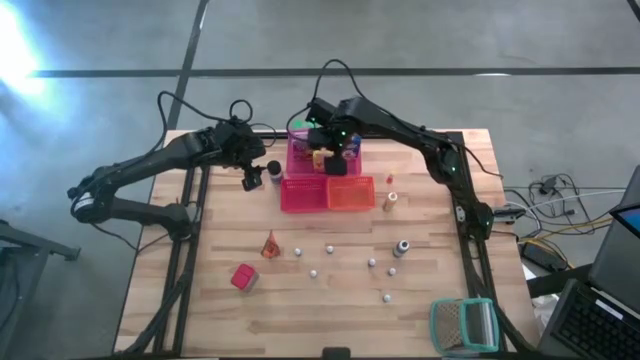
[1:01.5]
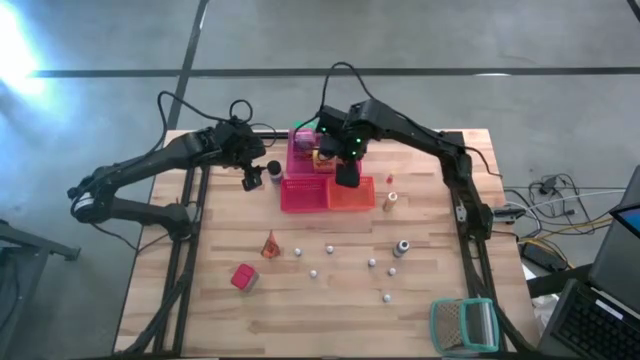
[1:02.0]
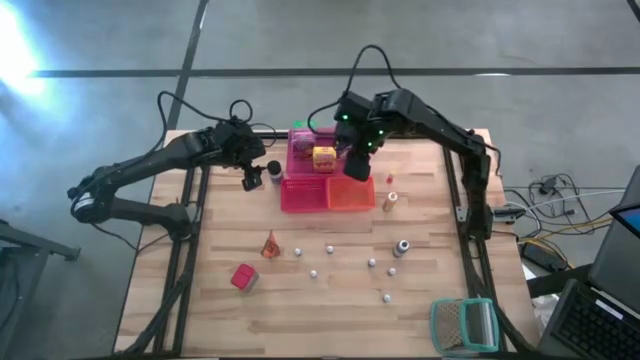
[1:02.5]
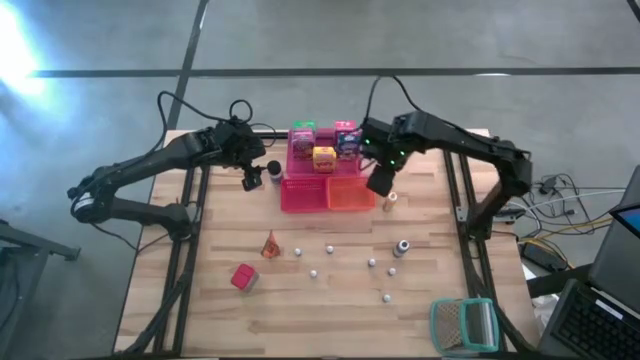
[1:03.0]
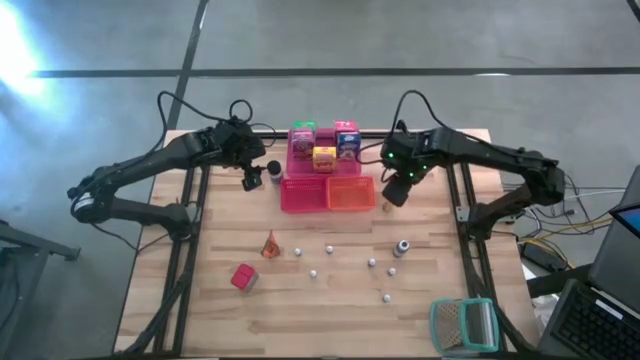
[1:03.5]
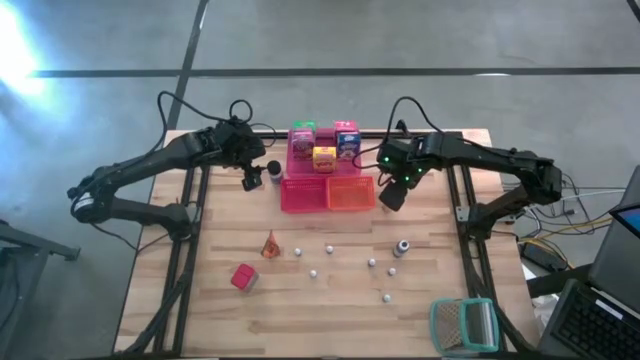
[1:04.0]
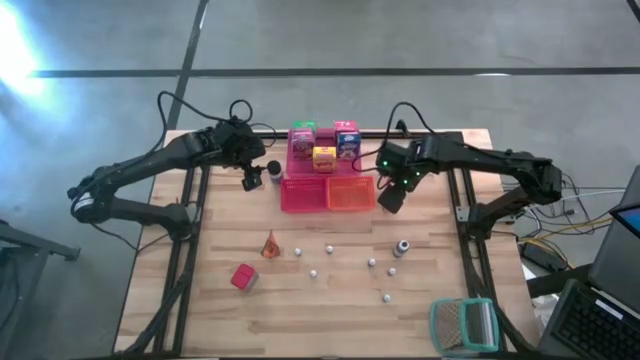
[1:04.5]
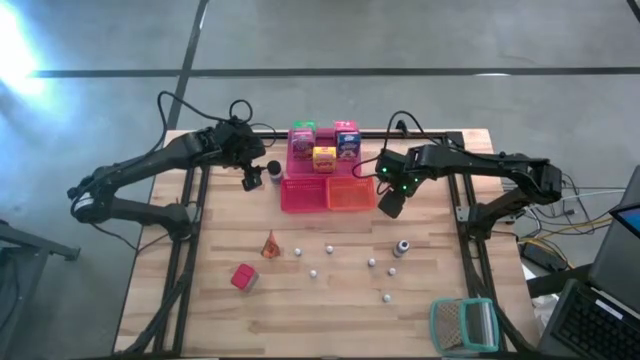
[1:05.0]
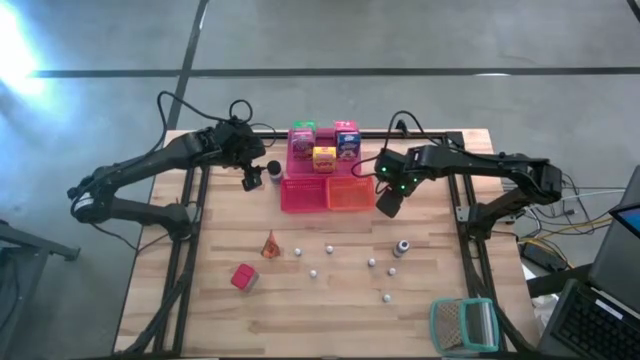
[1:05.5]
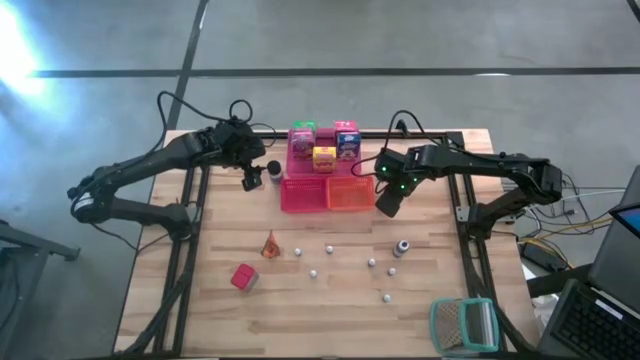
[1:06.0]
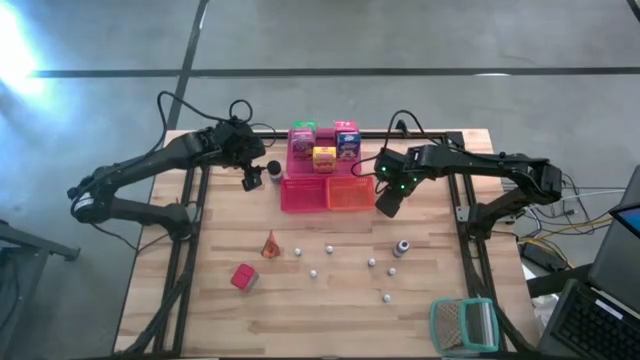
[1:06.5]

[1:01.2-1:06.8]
Task: Pick & Place Kitchen Items
Put the large yellow food coloring bottle into the orange bin

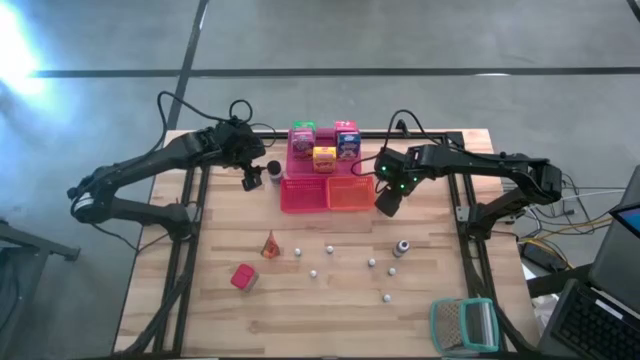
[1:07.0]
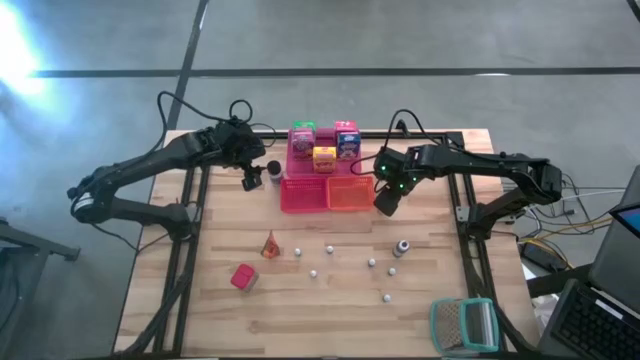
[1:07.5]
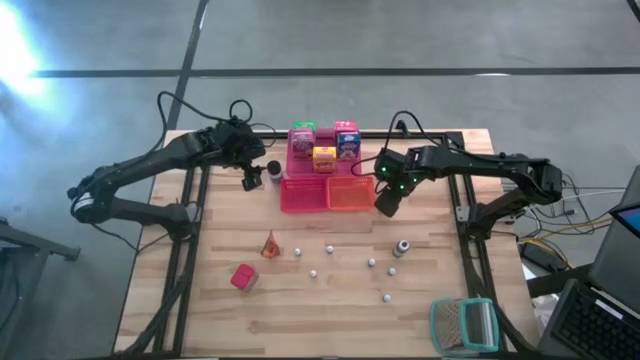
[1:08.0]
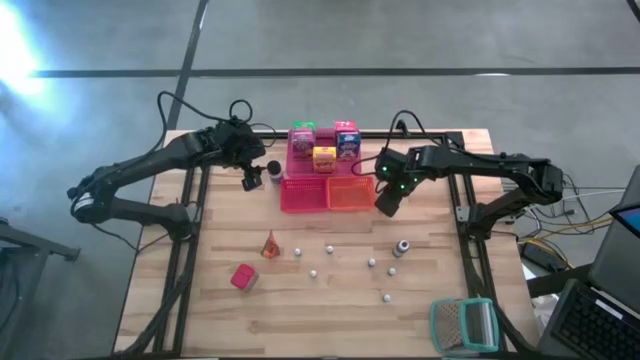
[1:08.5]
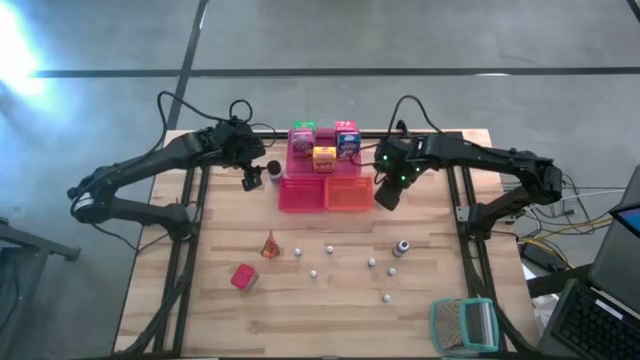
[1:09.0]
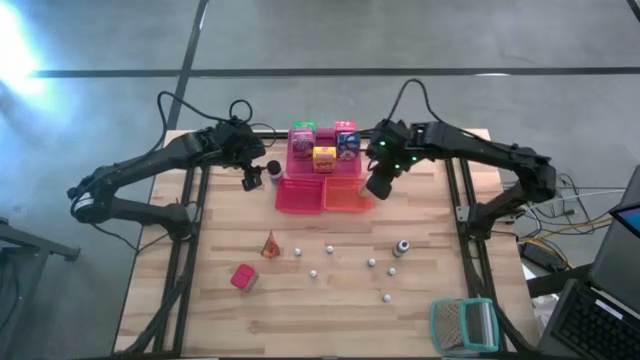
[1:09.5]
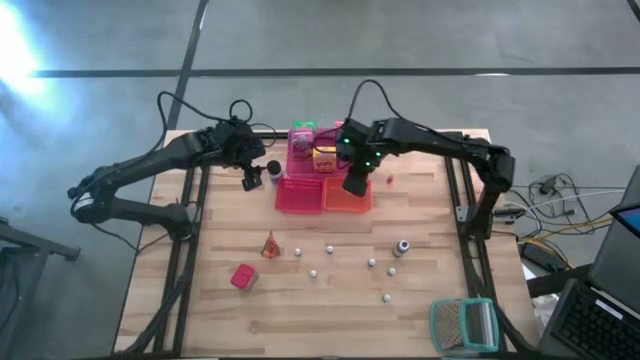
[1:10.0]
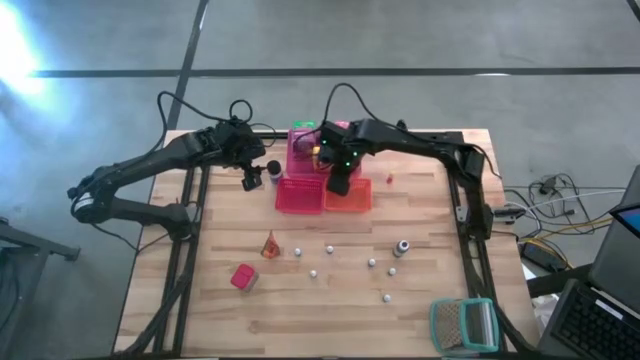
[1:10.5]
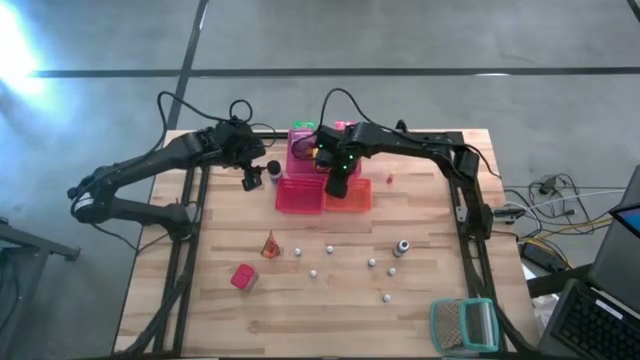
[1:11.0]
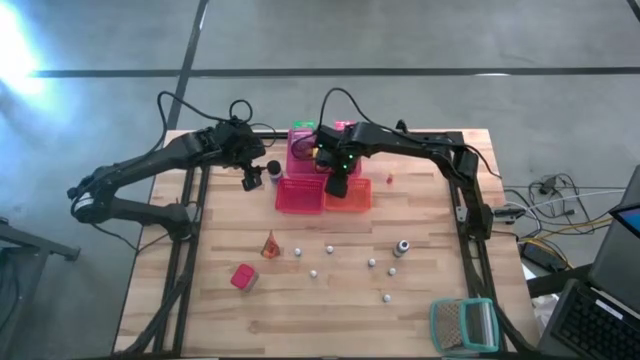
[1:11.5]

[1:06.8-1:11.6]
Put the large yellow food coloring bottle into the orange bin

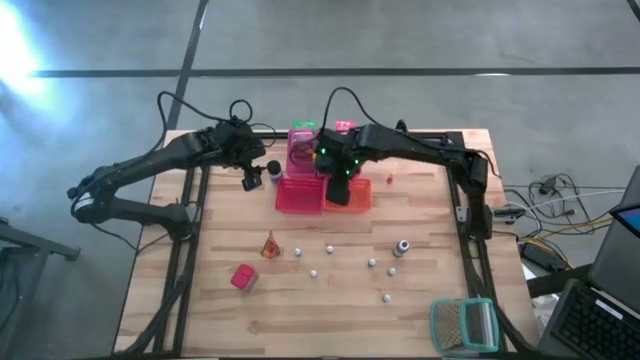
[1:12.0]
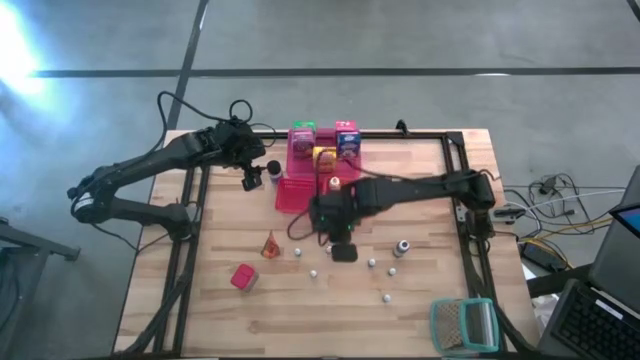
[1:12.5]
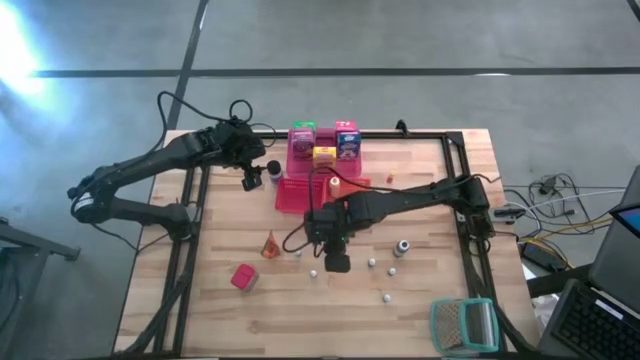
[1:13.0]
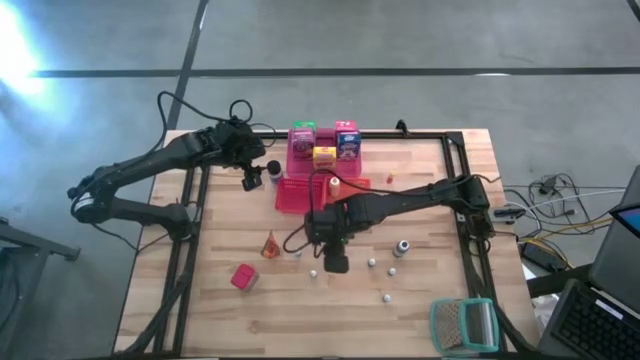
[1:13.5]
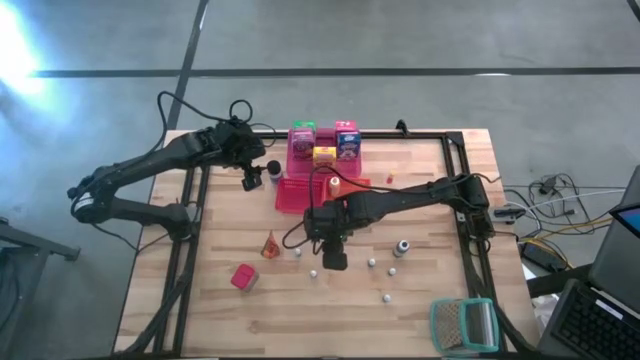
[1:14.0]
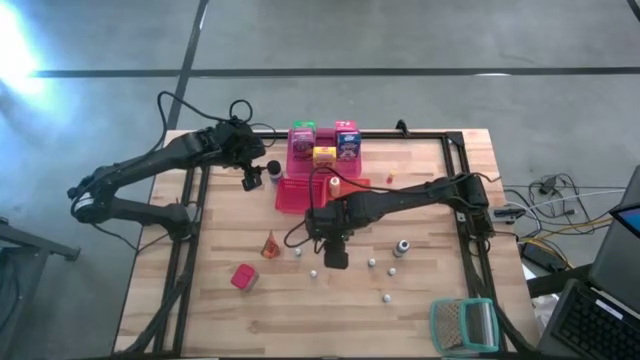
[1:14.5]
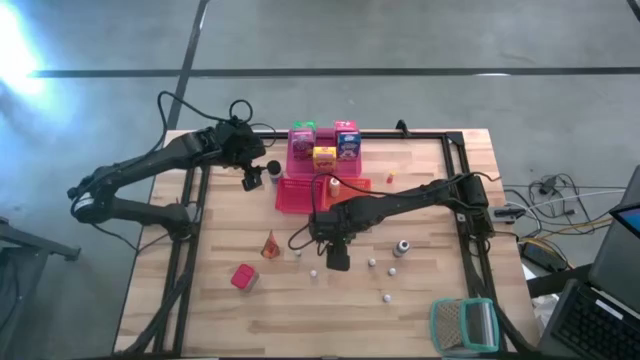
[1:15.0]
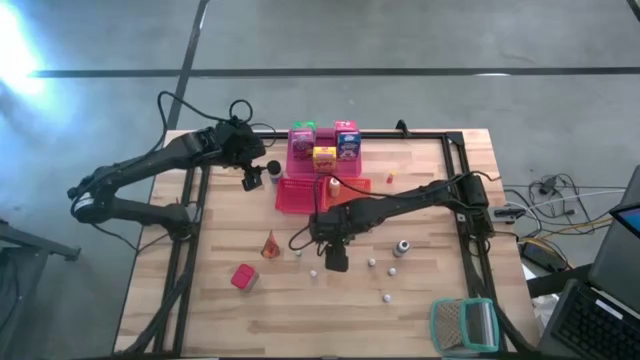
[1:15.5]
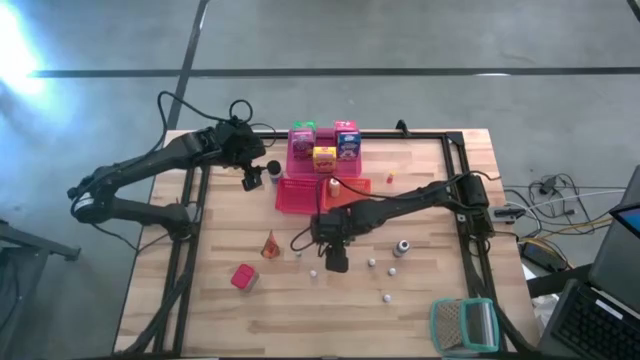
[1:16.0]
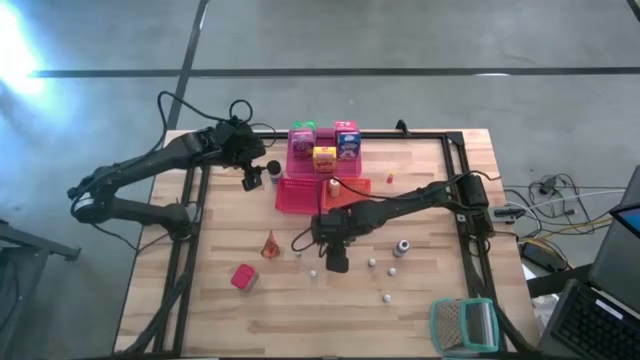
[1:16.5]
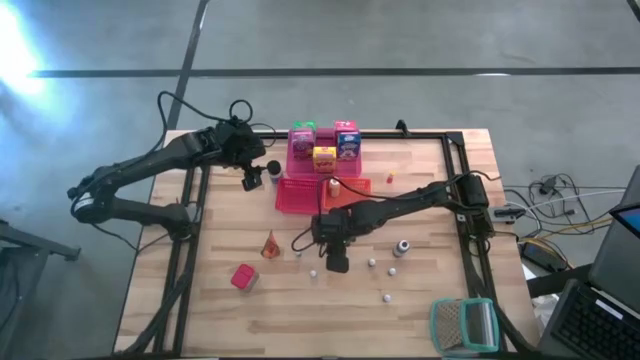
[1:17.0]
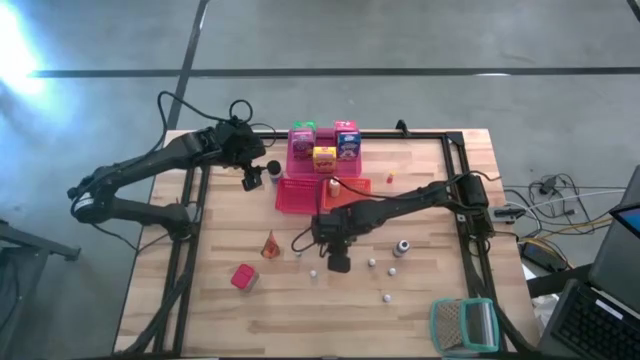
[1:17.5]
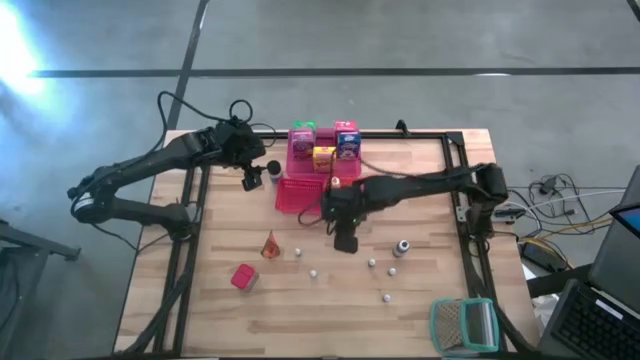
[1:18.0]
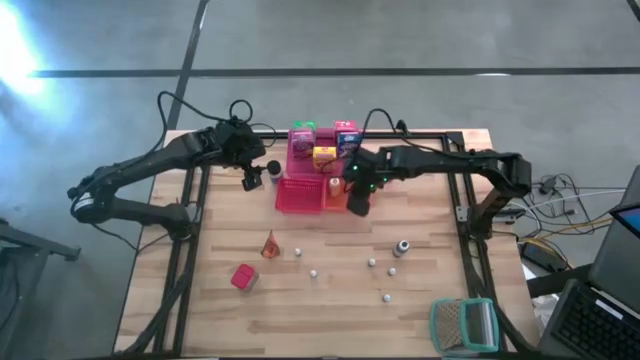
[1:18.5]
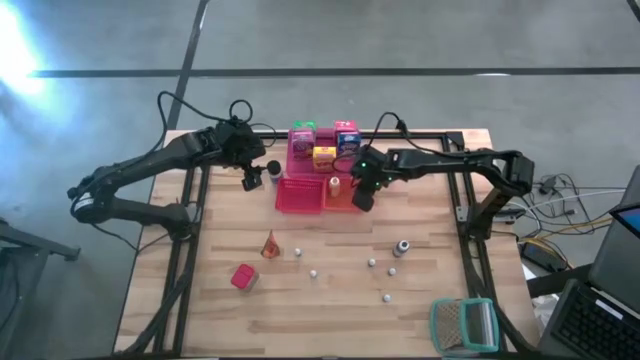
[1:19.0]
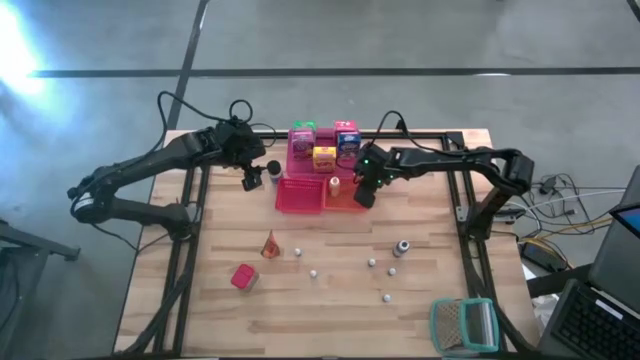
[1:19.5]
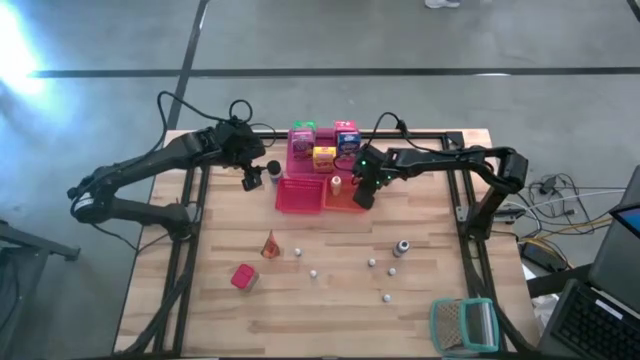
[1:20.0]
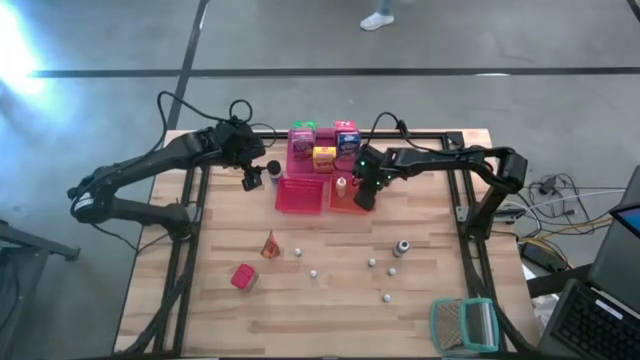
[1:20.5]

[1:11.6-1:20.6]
Put the small red food coloring bottle into the orange bin

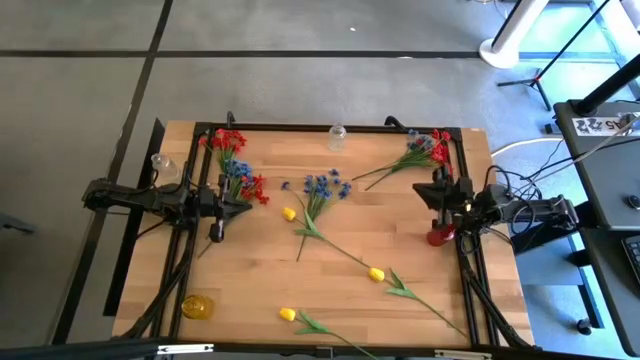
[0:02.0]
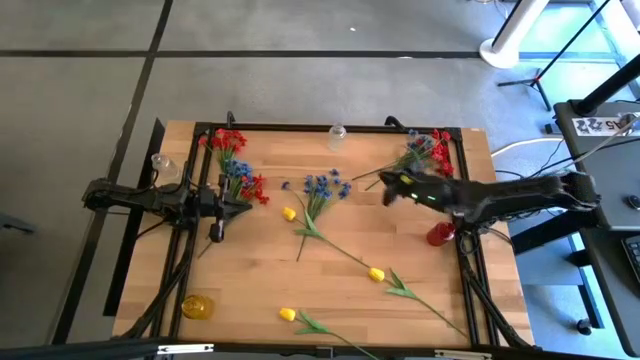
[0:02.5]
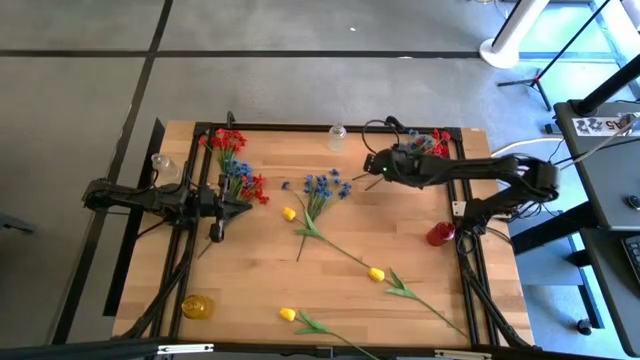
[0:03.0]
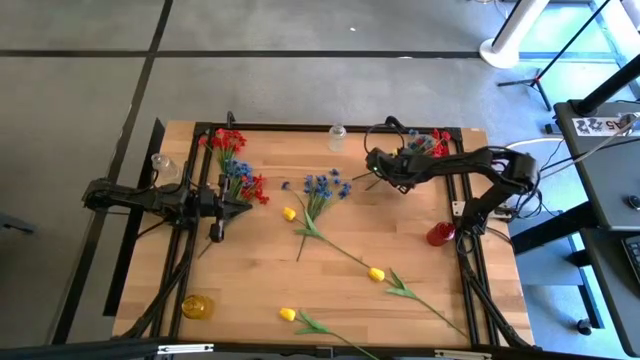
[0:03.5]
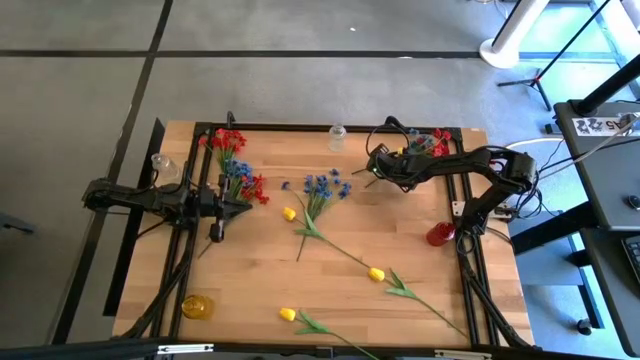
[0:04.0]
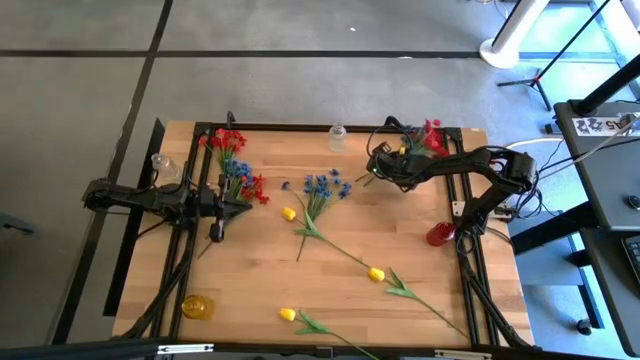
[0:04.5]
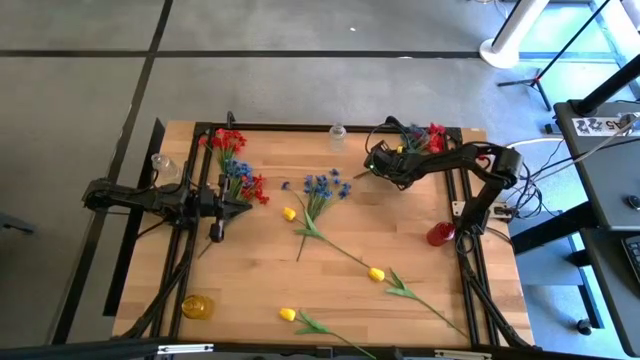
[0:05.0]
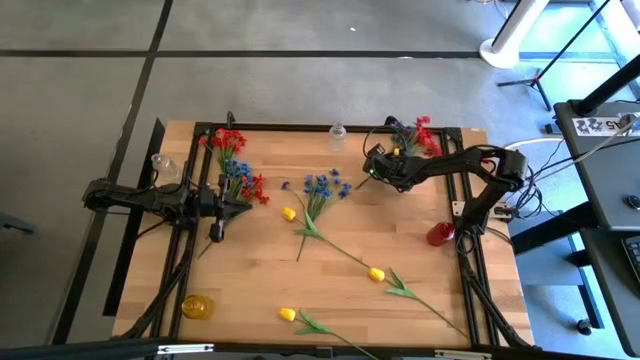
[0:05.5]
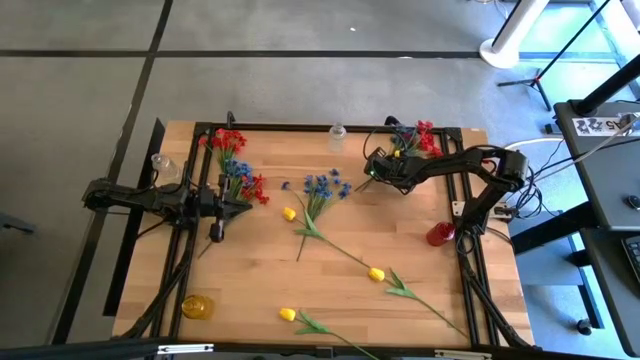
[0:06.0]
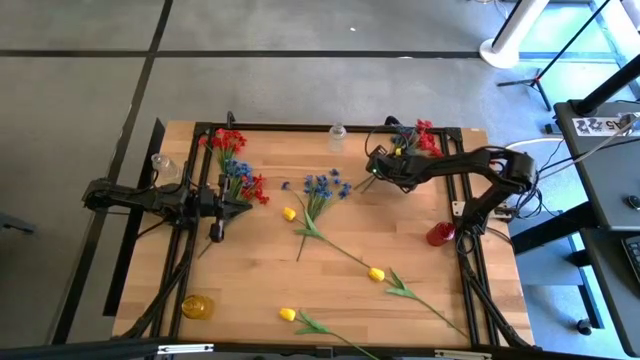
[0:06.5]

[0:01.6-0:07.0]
Task: Sort flowers into vase by color
Put the top right red flowers into the transparent vase
